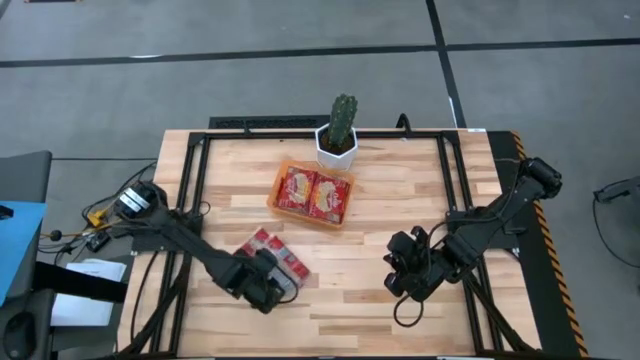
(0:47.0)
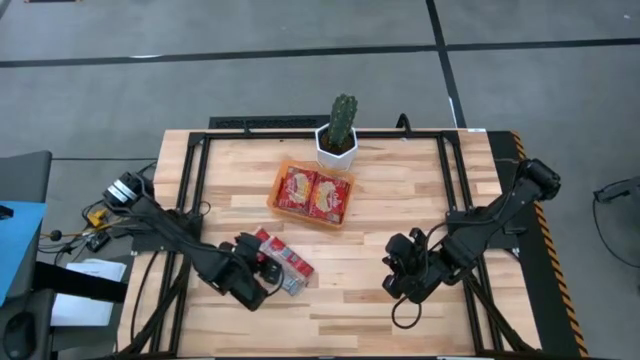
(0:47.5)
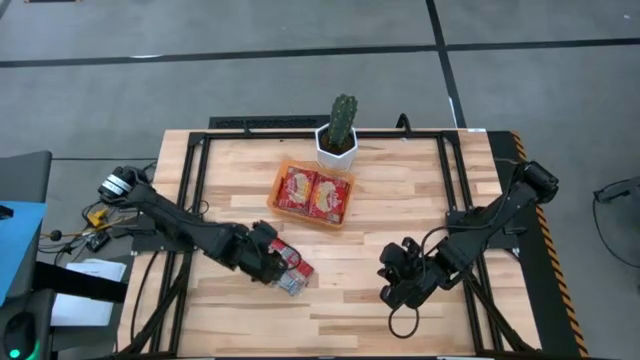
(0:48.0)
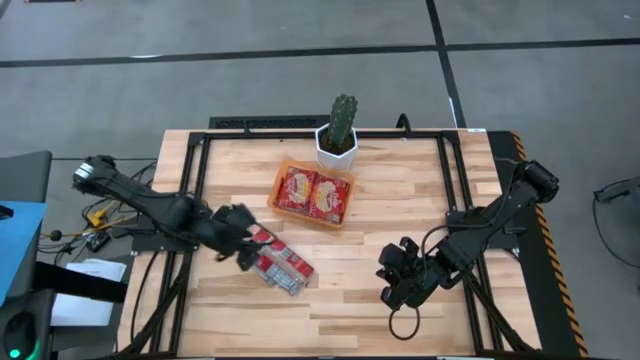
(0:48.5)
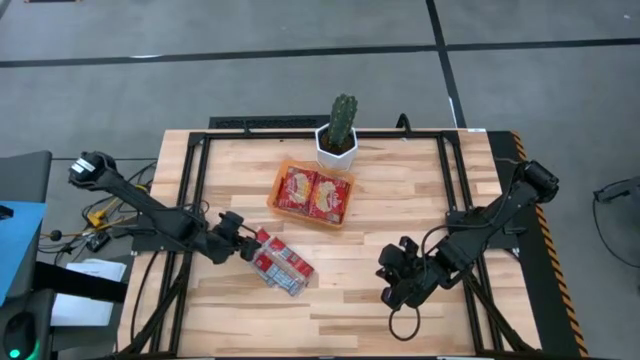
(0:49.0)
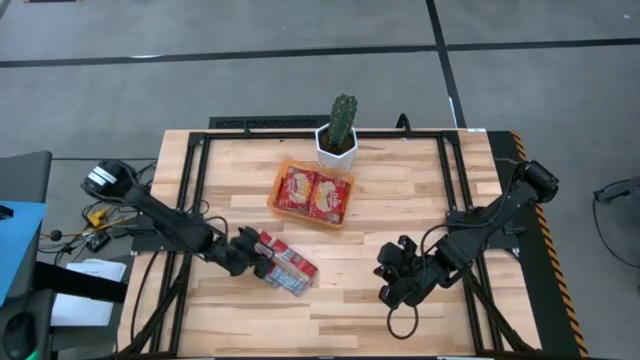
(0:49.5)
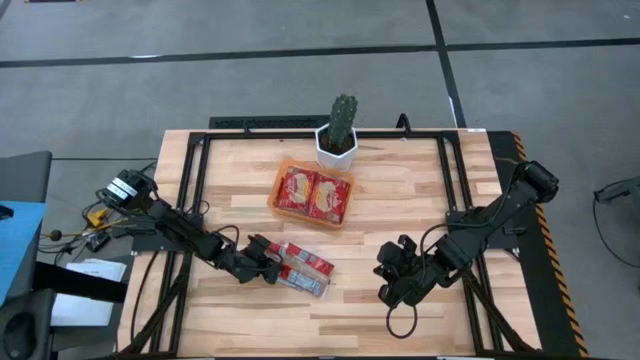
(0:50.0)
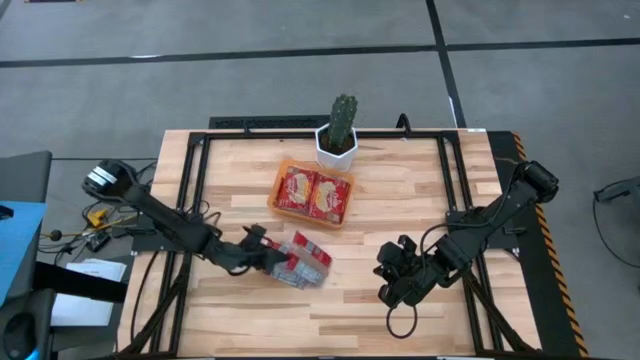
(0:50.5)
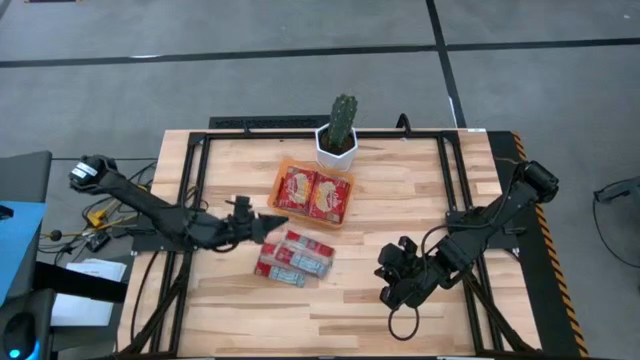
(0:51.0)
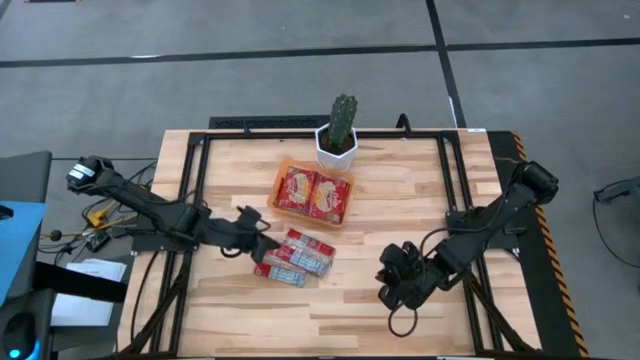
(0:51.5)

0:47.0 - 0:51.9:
Task: Sort popcorn bags into baskets
Put the popcorn bag into the orange bin

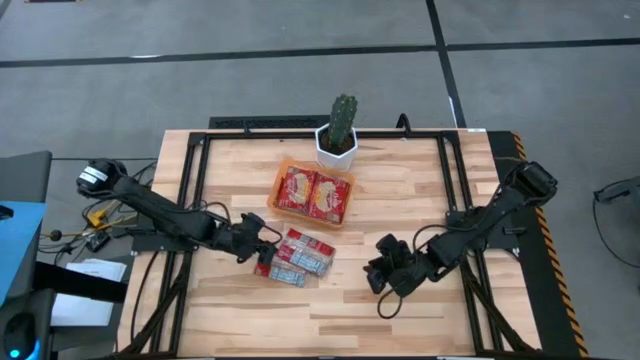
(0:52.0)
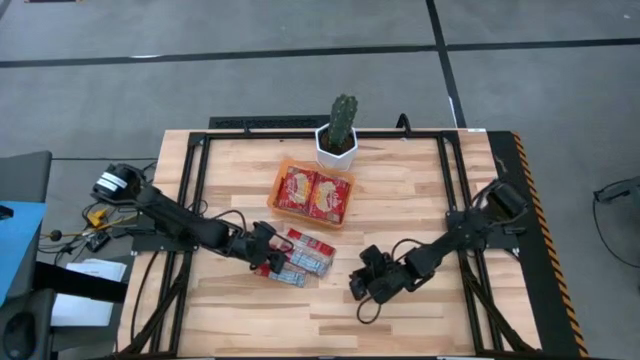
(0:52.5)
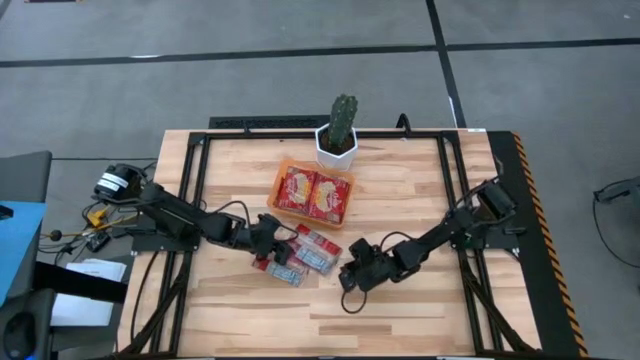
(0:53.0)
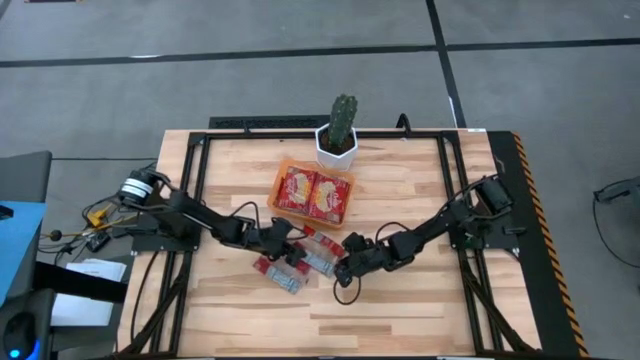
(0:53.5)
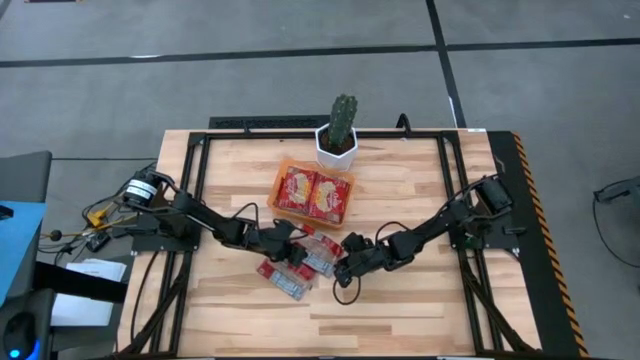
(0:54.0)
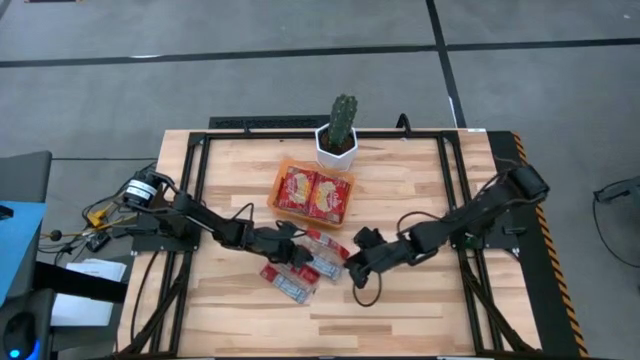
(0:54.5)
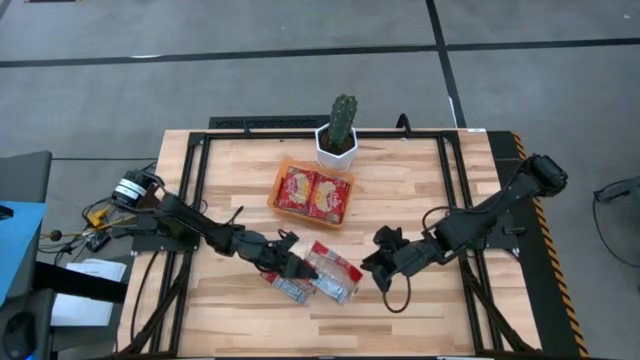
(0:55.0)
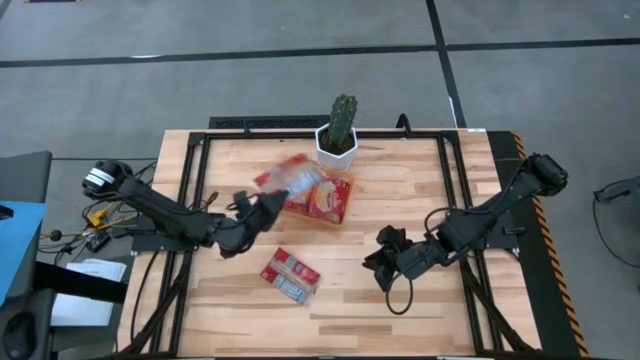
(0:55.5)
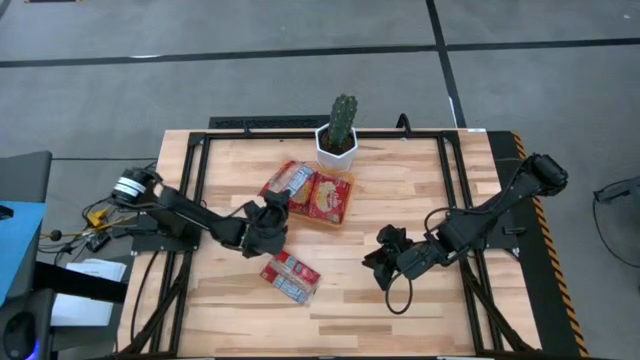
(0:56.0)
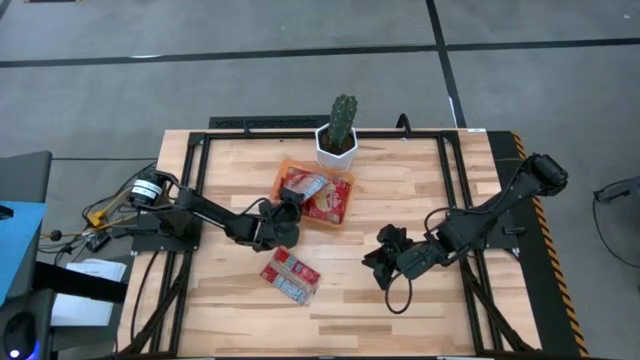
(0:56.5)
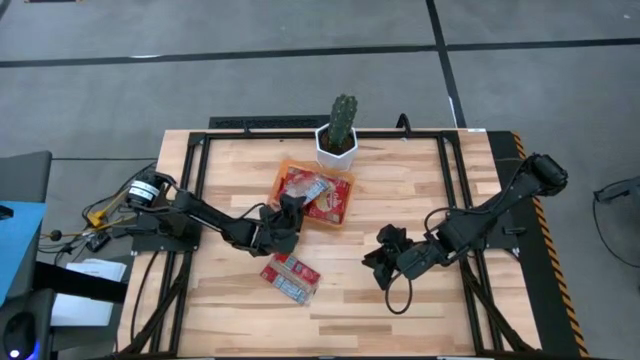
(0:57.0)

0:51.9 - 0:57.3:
Put the popcorn bag into the orange bin

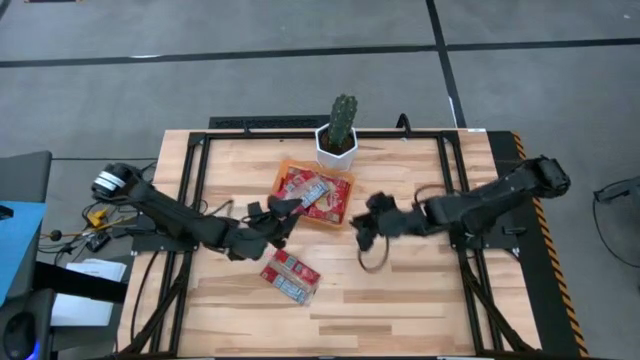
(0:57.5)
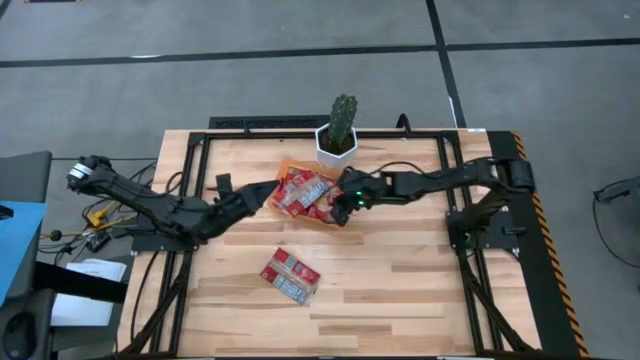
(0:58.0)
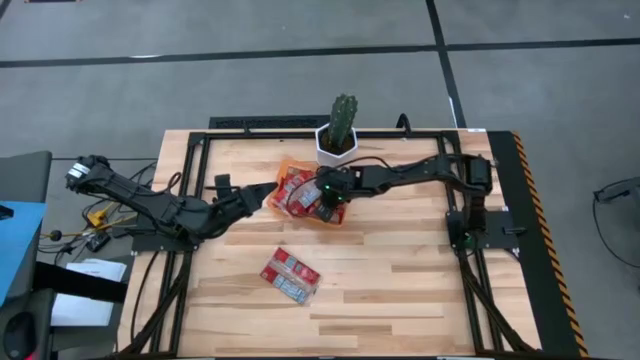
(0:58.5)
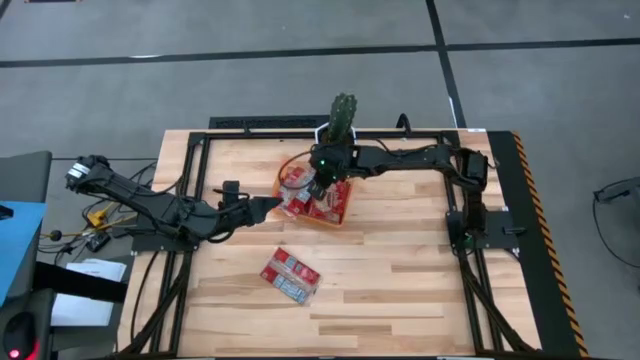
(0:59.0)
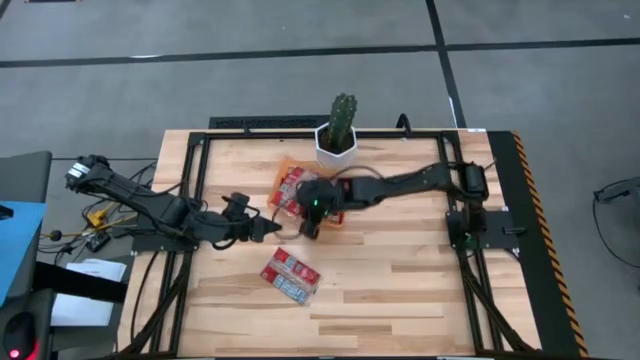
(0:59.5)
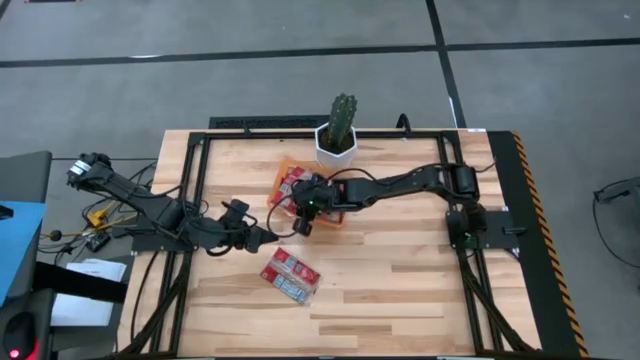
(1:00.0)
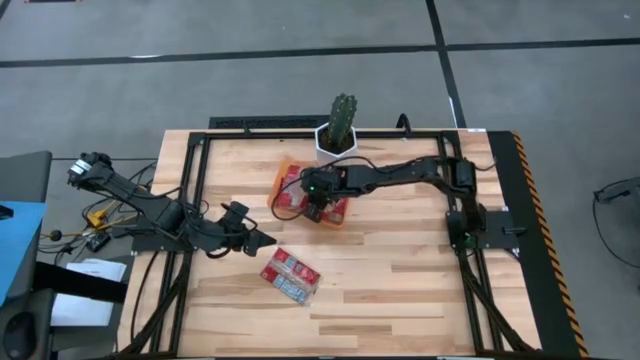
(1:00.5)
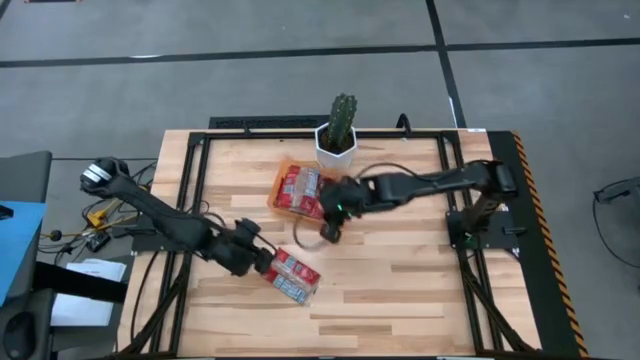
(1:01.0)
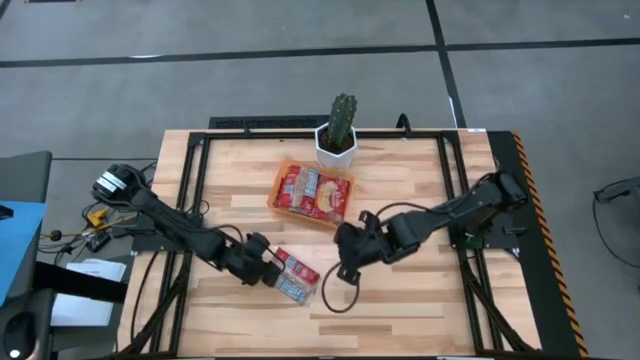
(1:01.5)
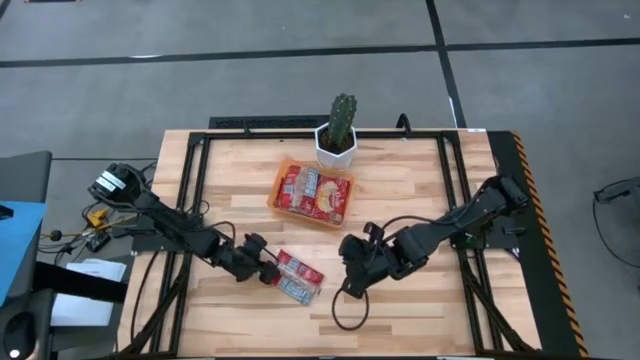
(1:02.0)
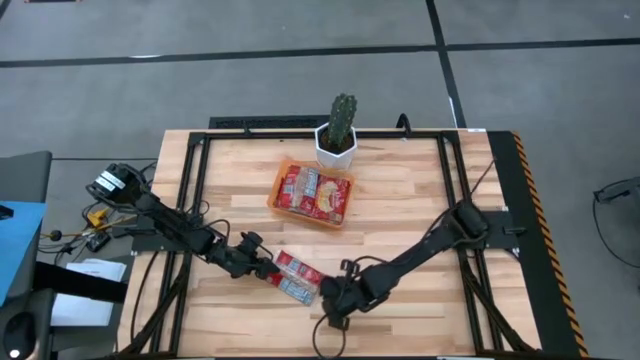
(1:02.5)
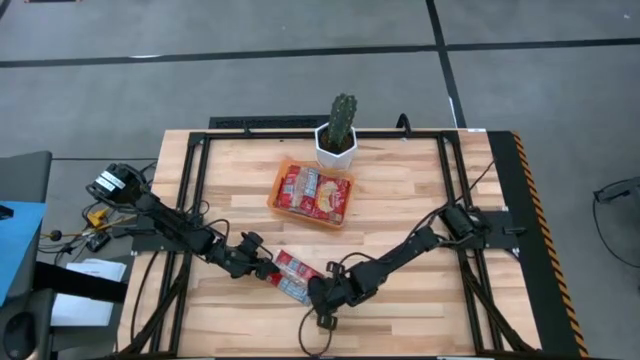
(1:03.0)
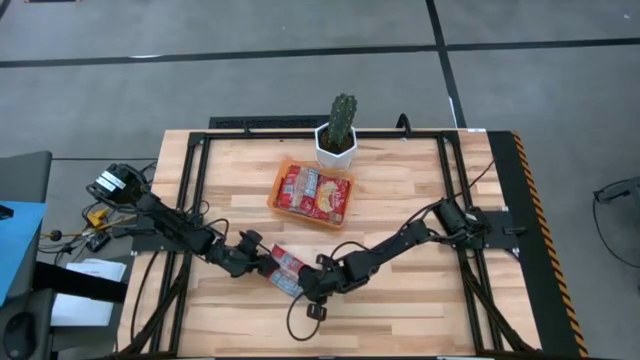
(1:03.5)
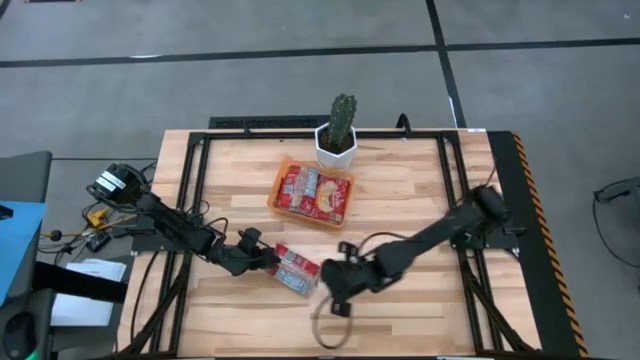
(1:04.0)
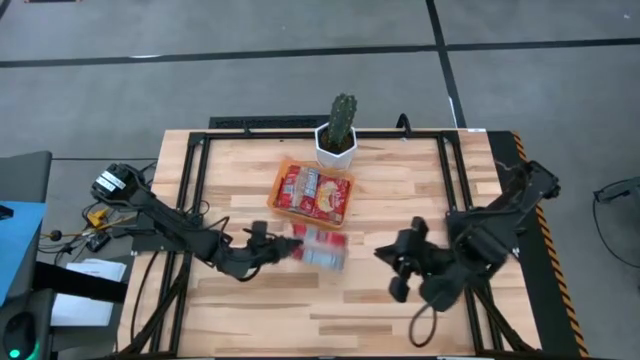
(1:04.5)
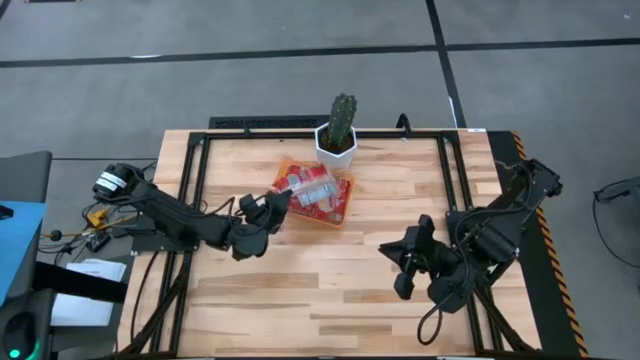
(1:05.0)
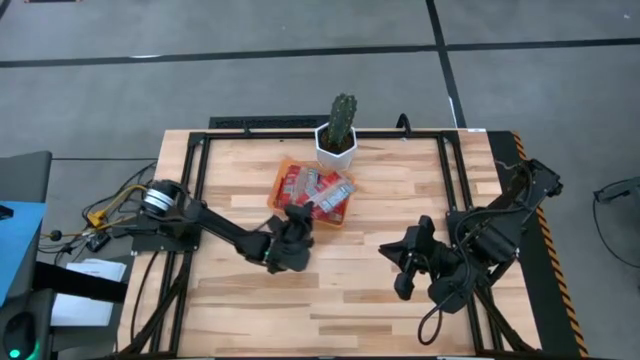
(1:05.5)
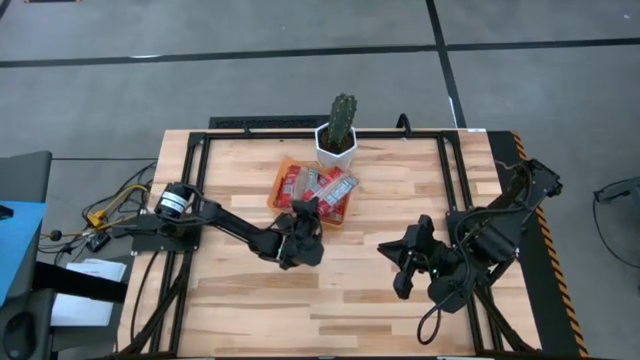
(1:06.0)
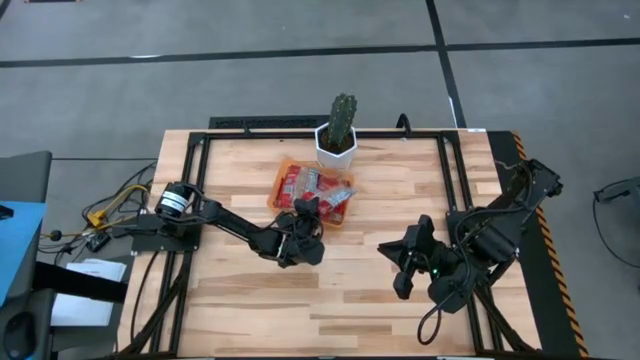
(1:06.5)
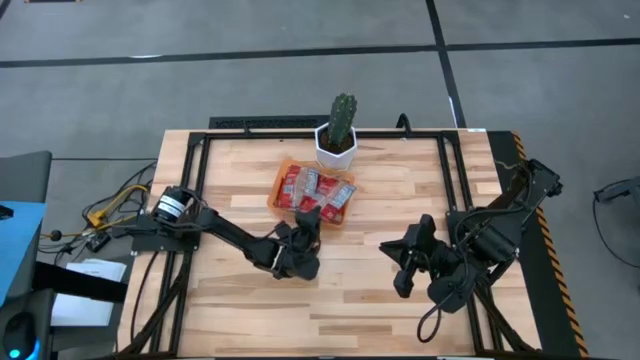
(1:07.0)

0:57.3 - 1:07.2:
Put the popcorn bag into the orange bin
